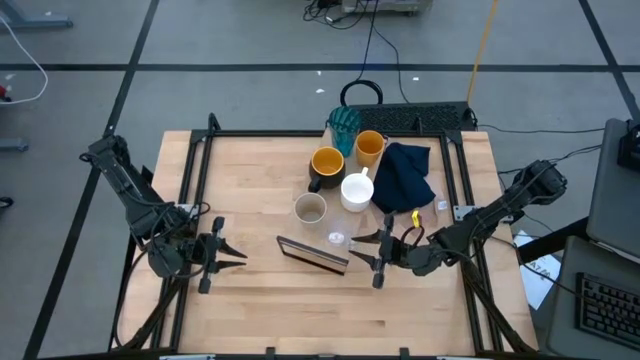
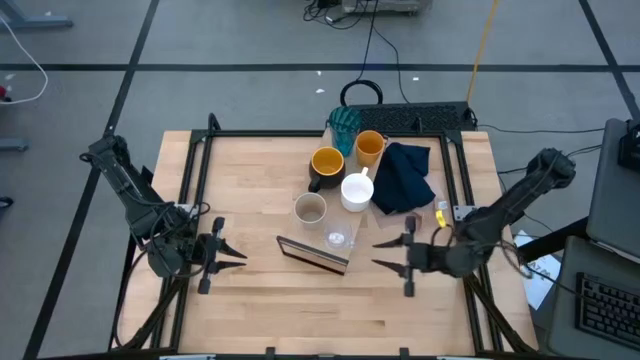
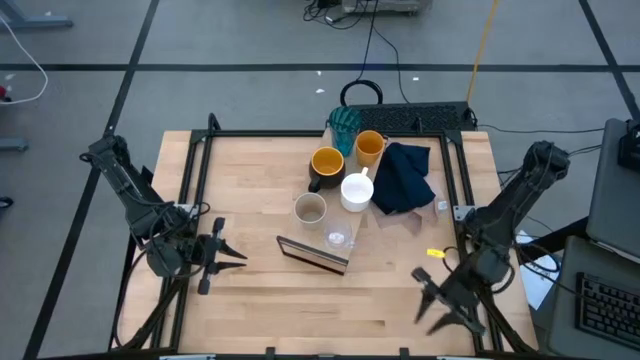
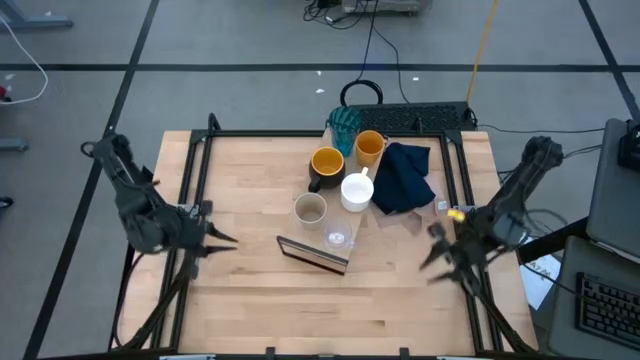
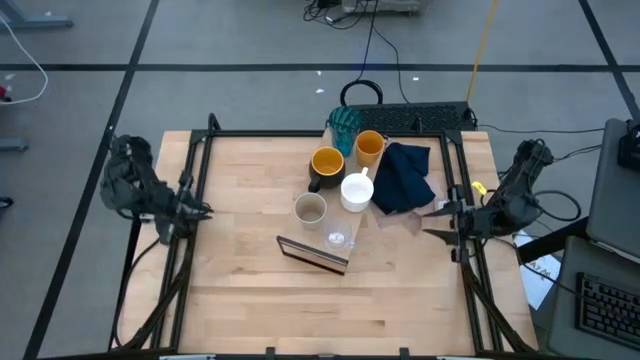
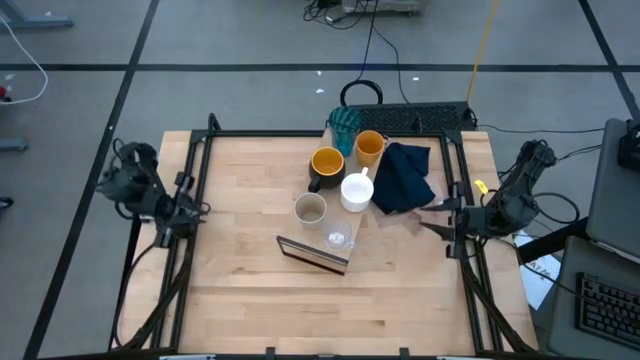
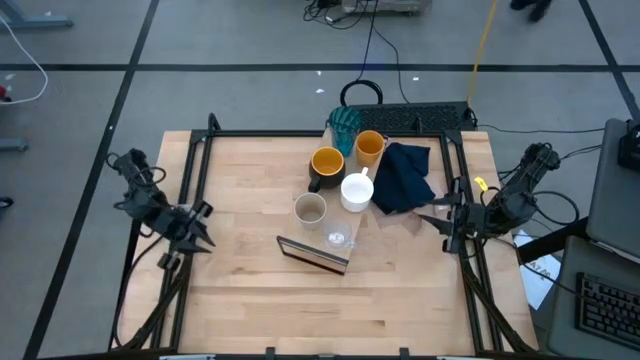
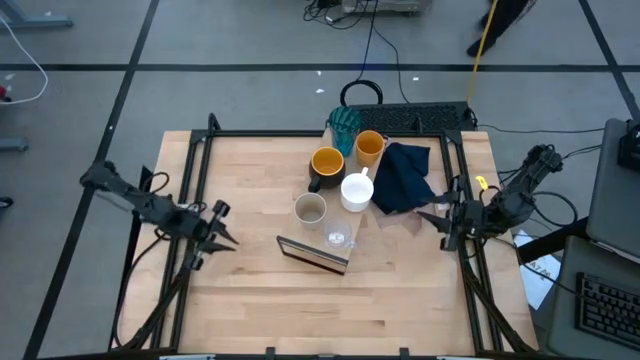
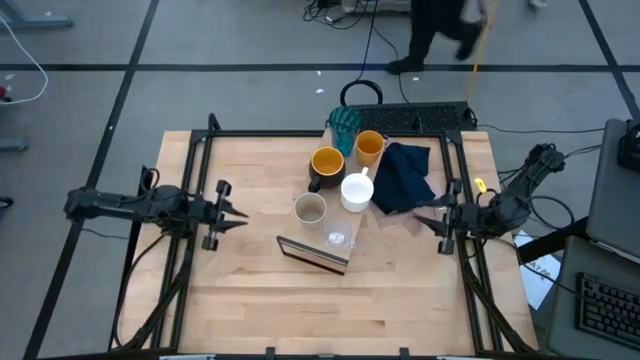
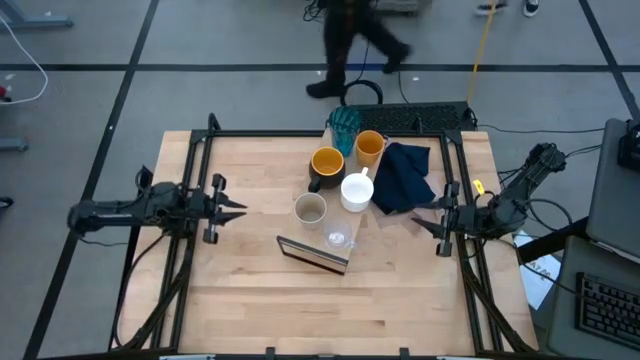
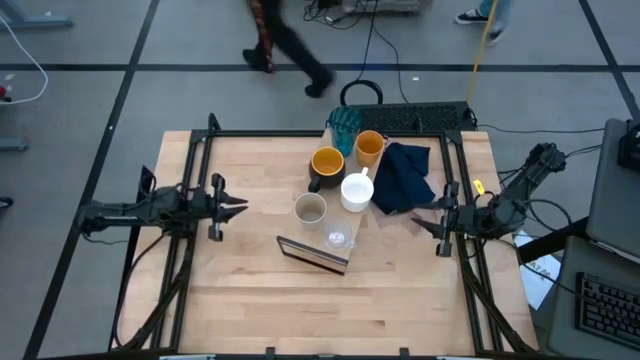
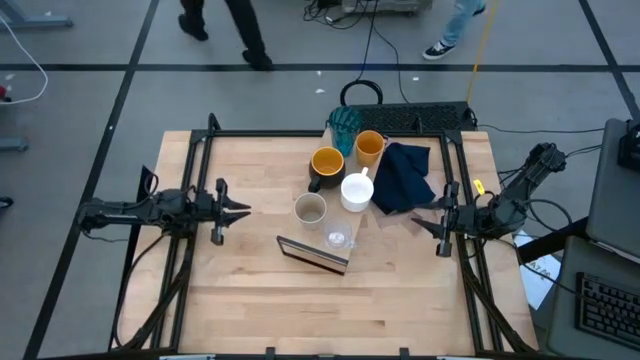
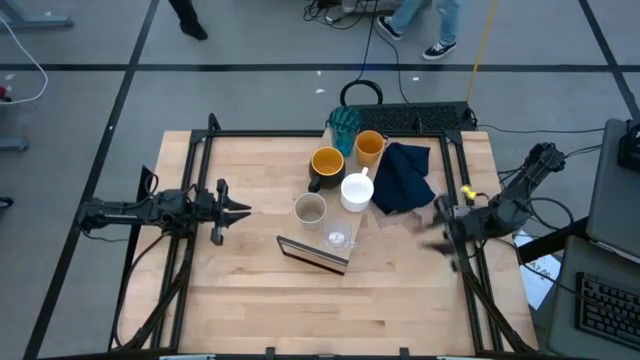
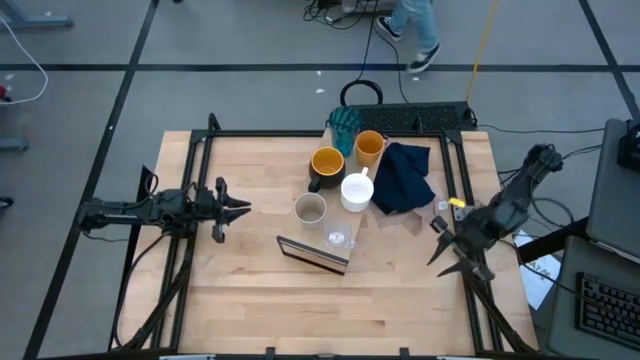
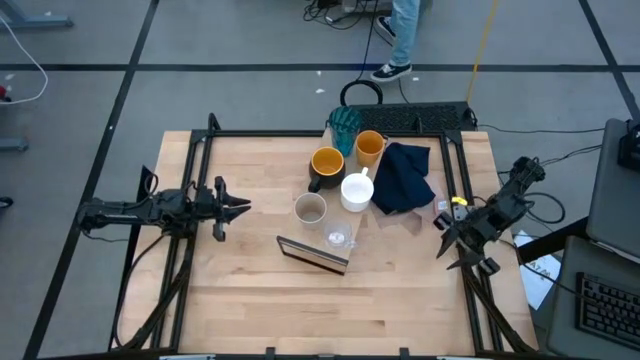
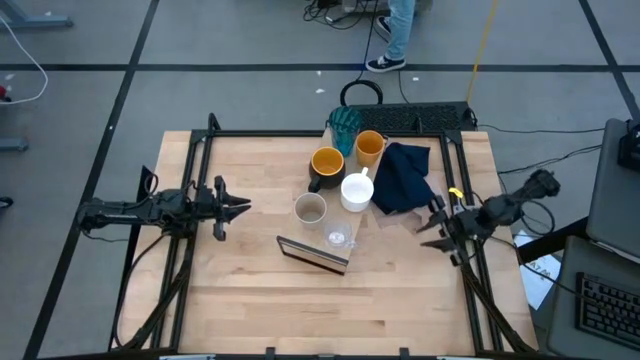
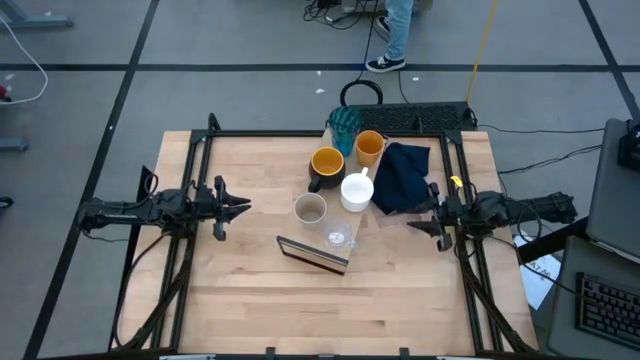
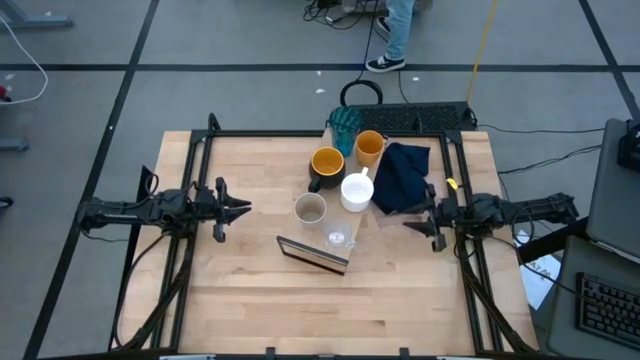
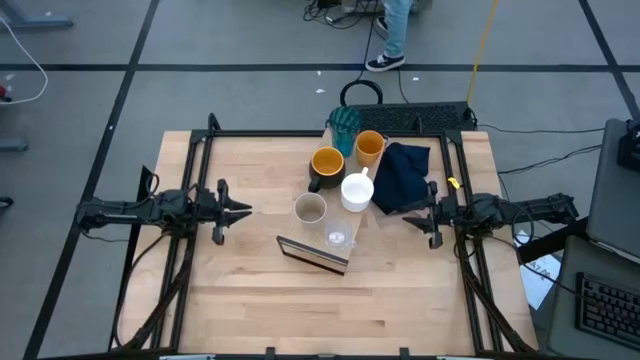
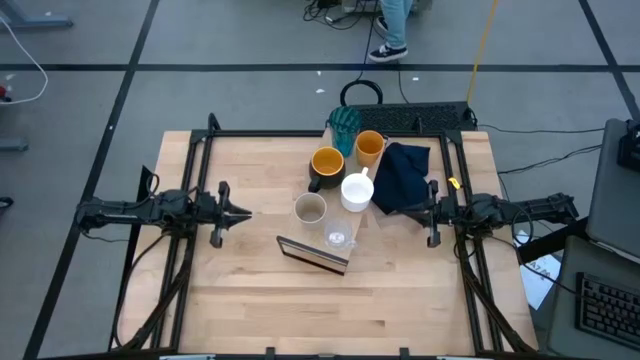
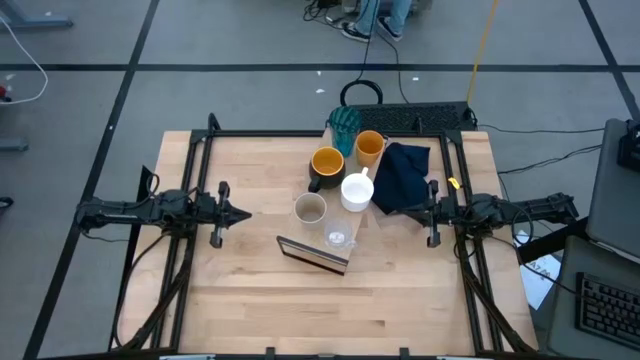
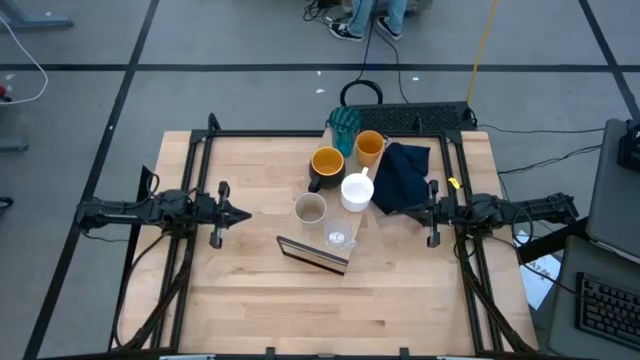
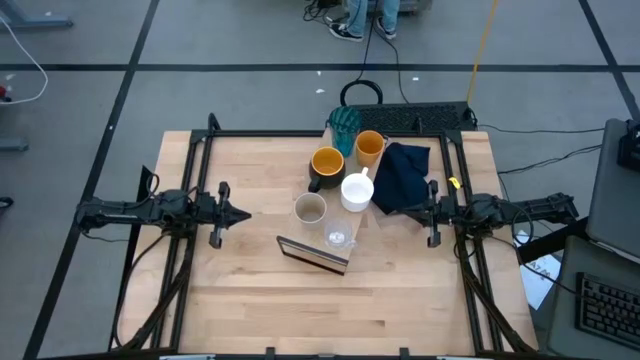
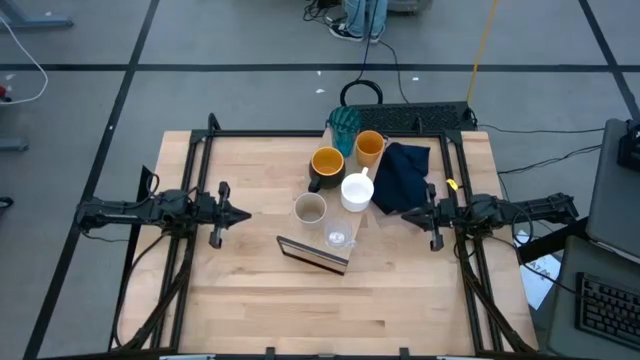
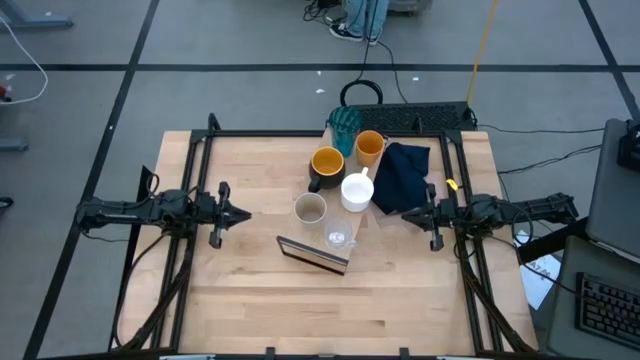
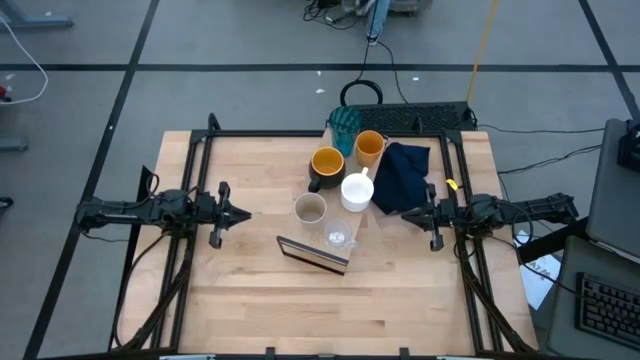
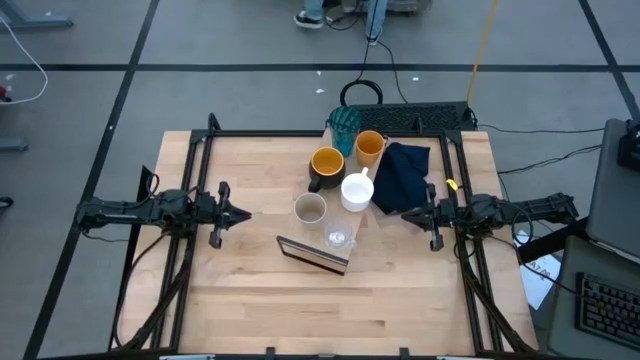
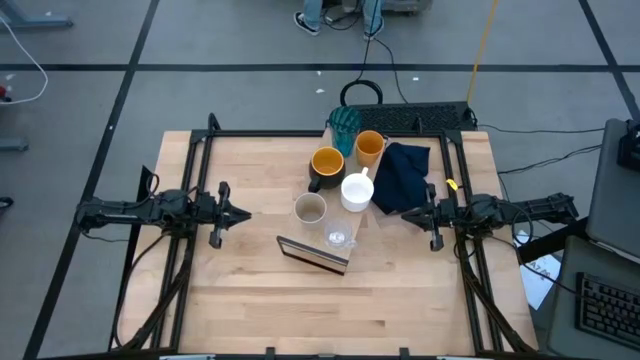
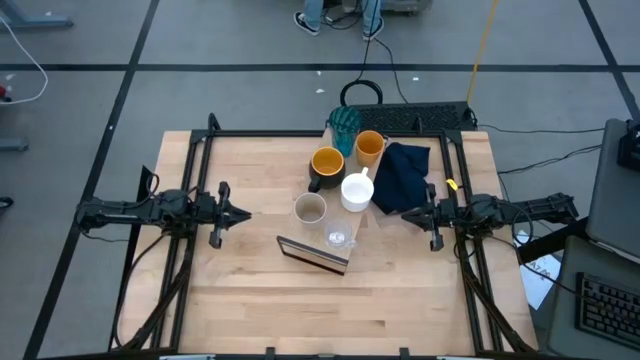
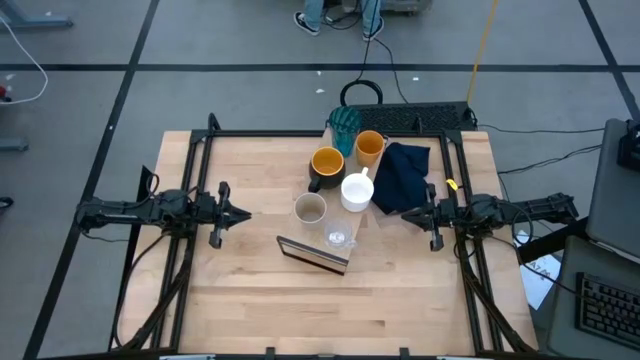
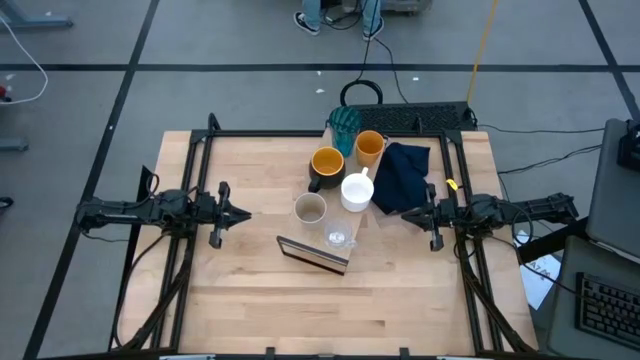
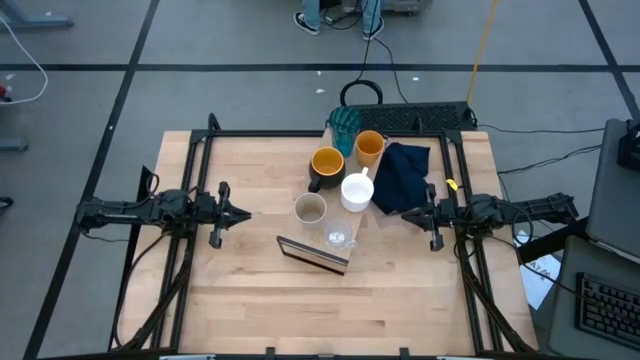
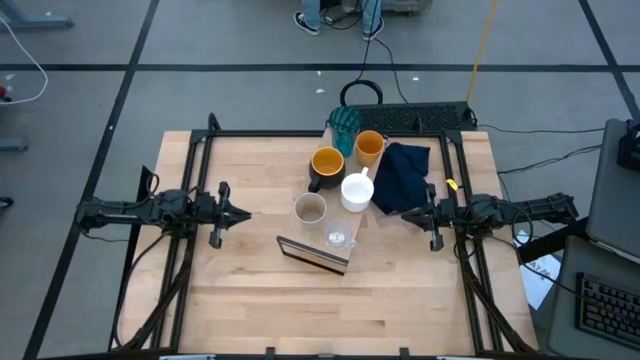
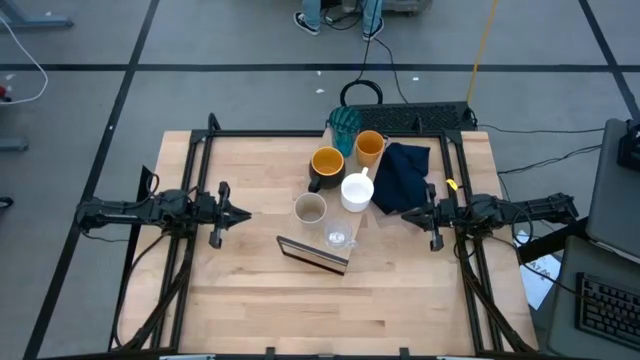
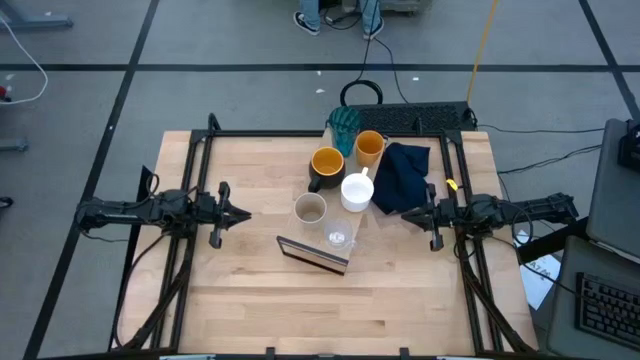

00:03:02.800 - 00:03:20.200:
Task: Stack small to large cups/mugs on shelf
Return to Home Position

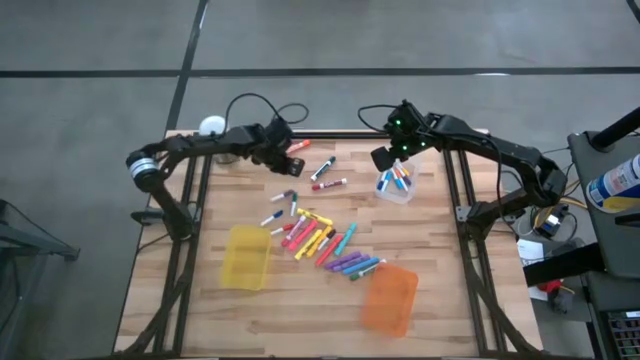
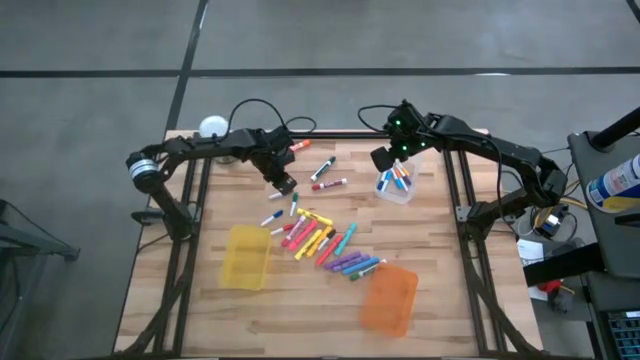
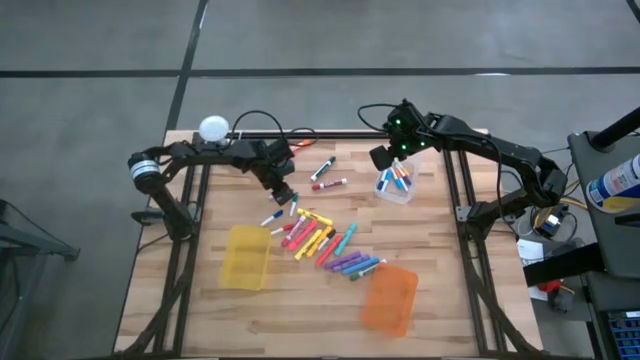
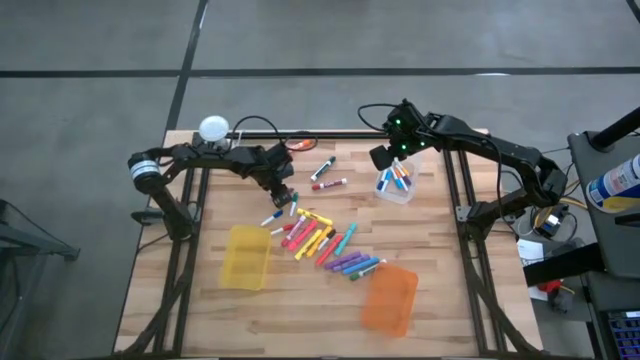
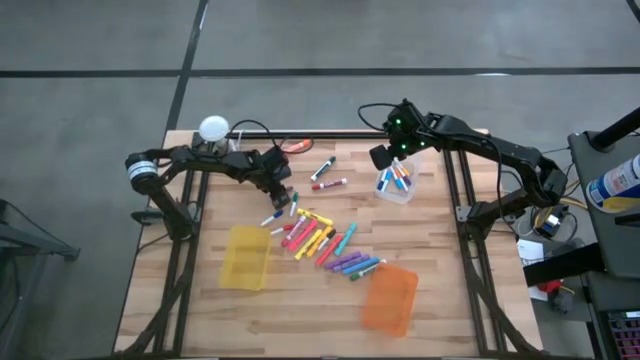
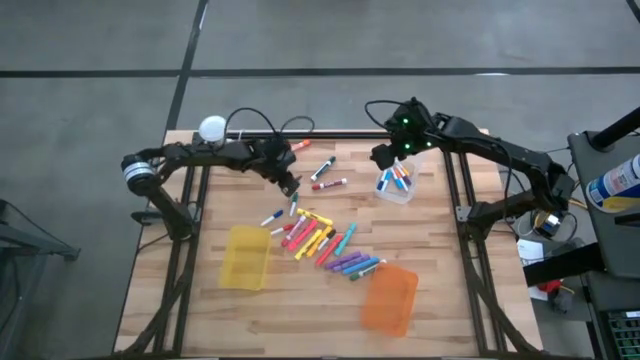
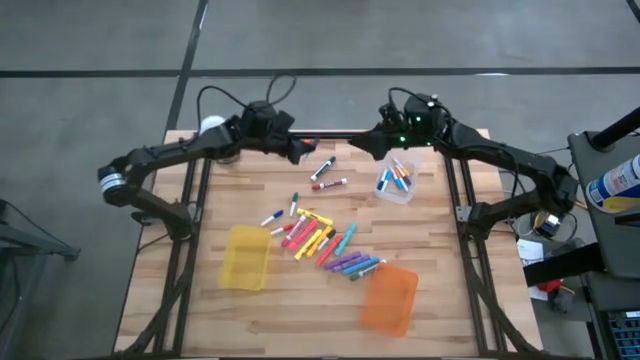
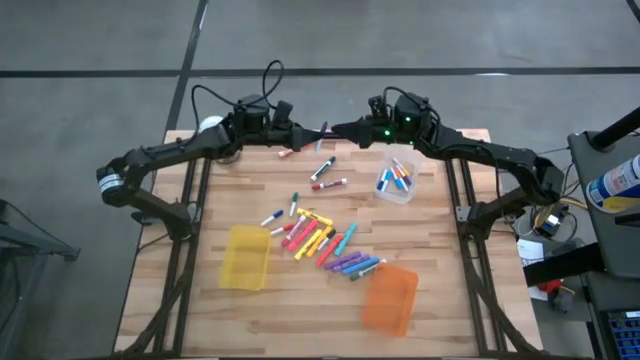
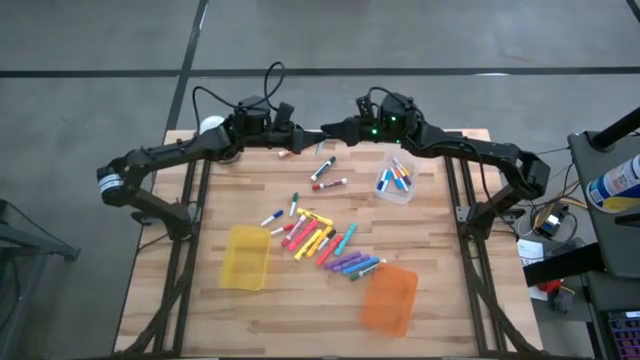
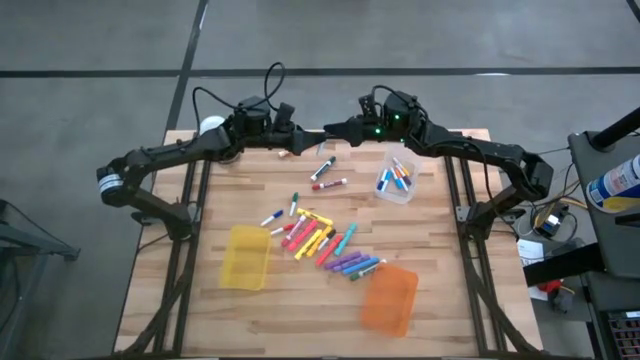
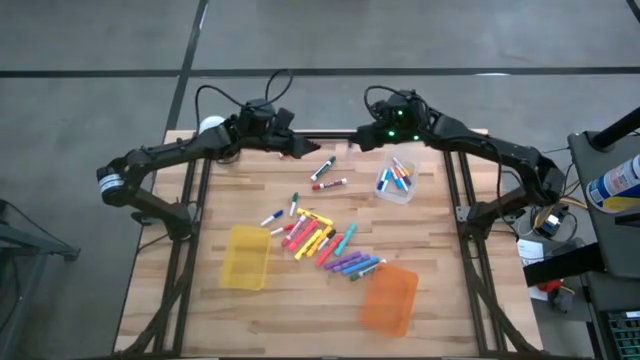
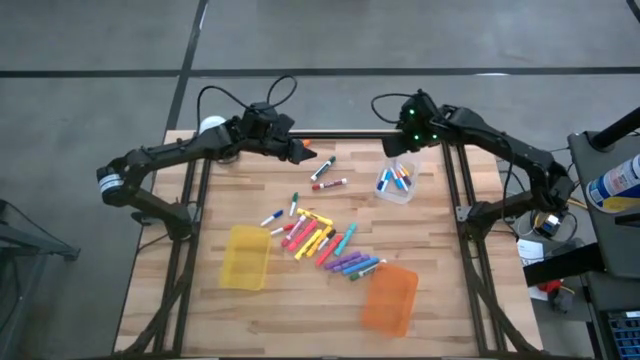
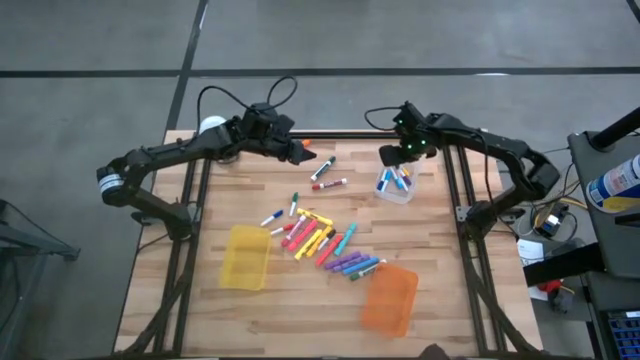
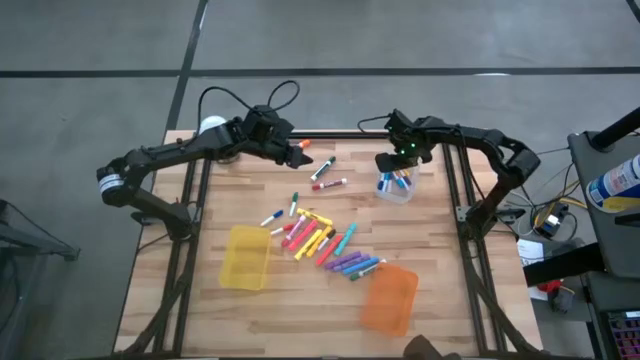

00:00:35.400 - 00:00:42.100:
Task: Pick & Place Markers
Put the small violet highlighter pen into the transparent bin
